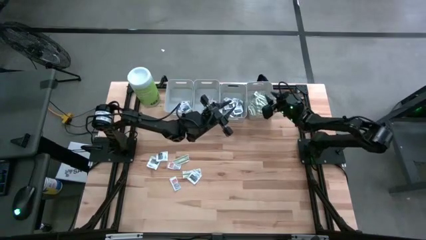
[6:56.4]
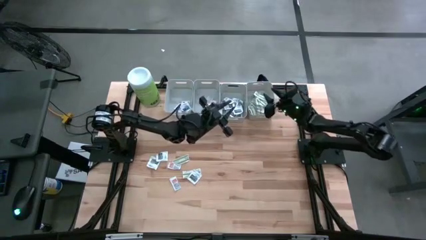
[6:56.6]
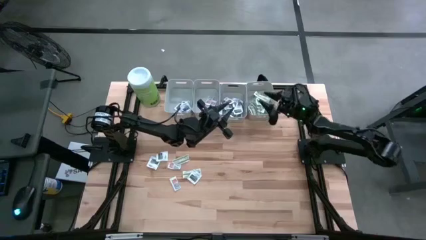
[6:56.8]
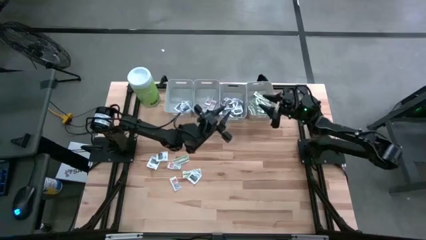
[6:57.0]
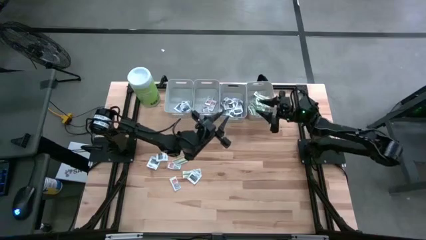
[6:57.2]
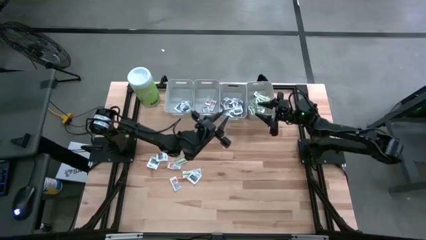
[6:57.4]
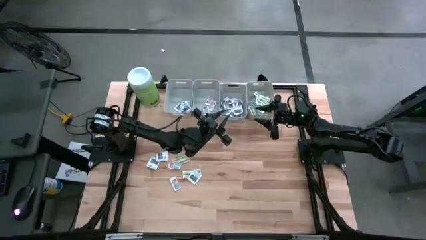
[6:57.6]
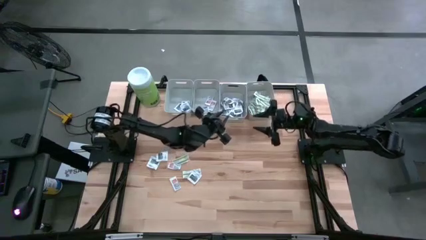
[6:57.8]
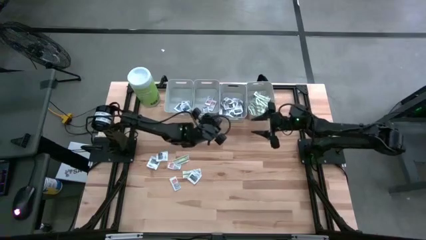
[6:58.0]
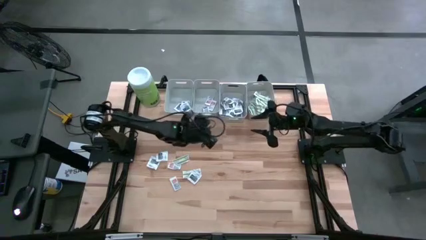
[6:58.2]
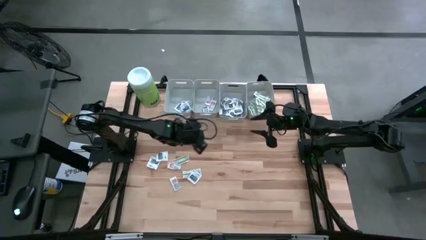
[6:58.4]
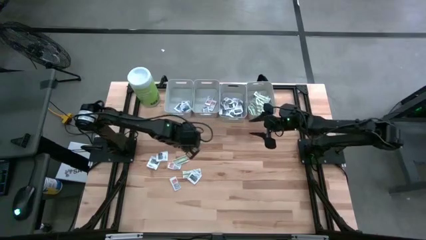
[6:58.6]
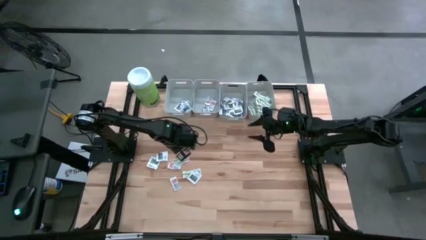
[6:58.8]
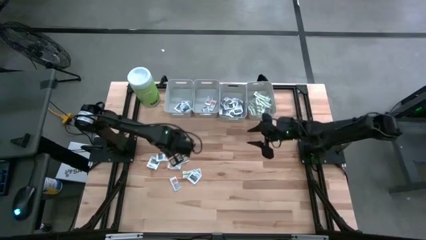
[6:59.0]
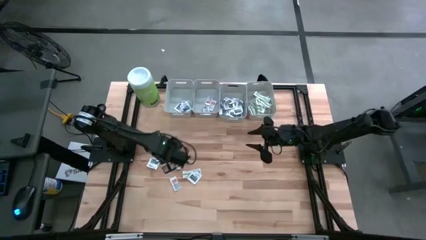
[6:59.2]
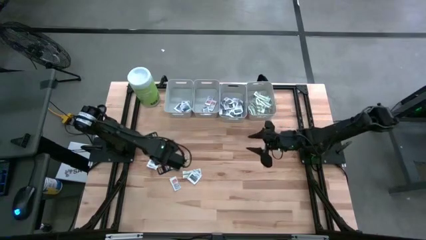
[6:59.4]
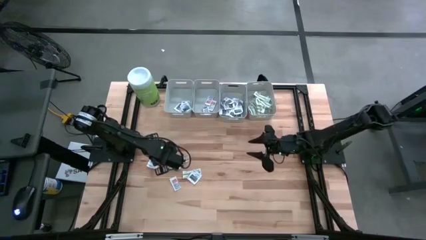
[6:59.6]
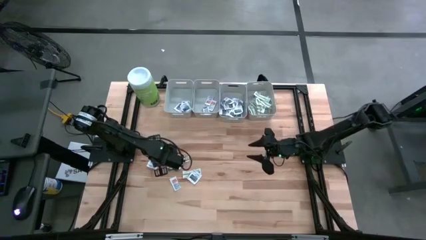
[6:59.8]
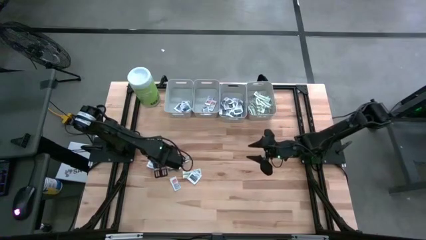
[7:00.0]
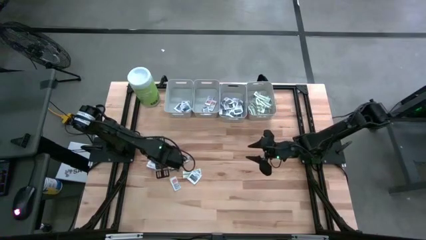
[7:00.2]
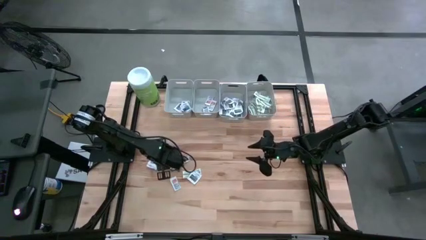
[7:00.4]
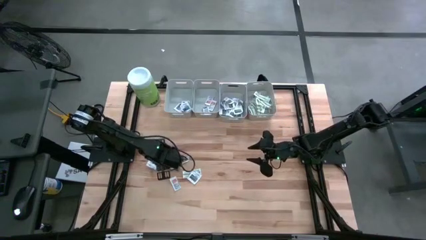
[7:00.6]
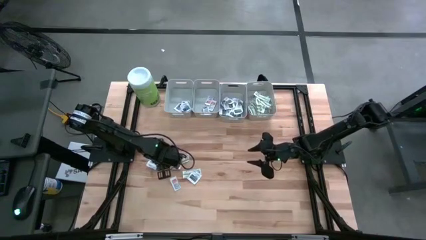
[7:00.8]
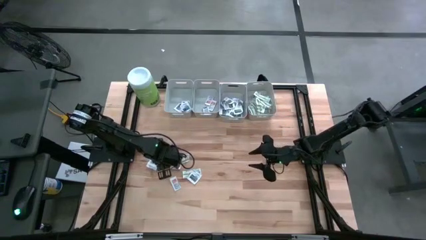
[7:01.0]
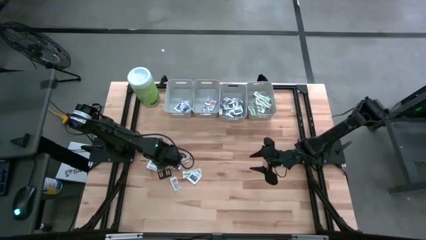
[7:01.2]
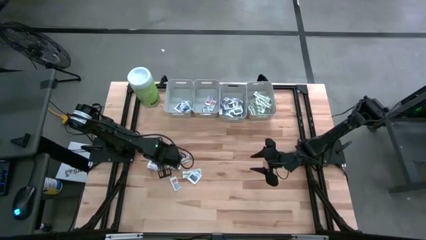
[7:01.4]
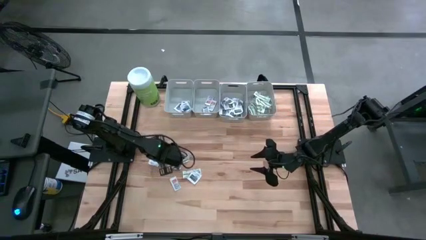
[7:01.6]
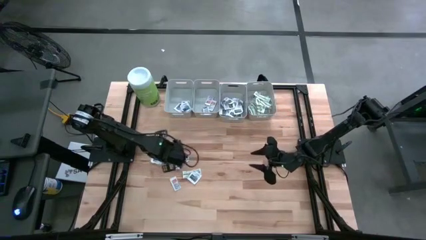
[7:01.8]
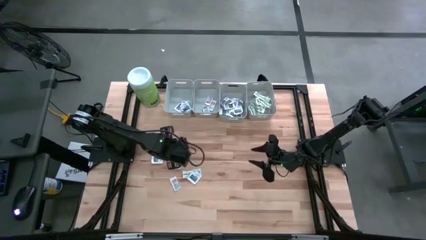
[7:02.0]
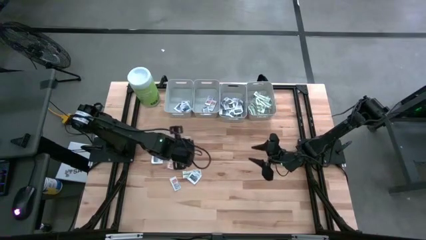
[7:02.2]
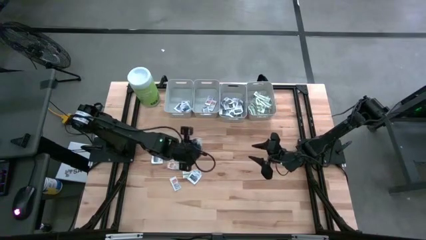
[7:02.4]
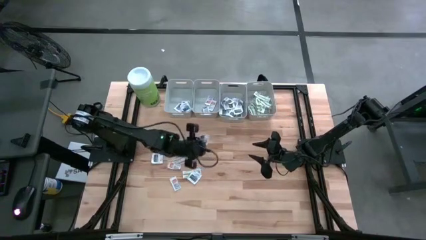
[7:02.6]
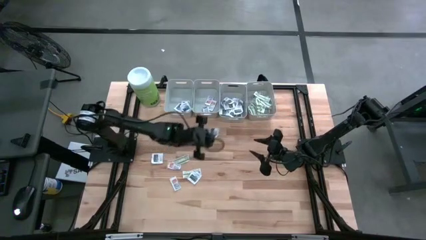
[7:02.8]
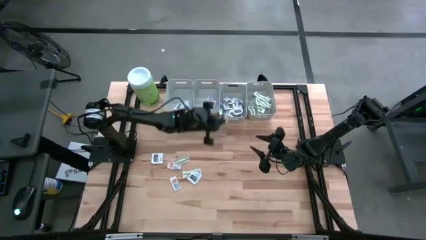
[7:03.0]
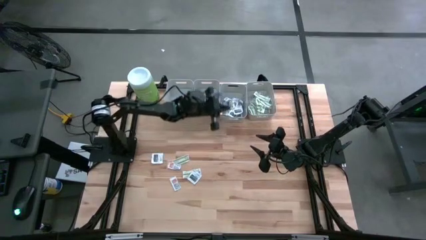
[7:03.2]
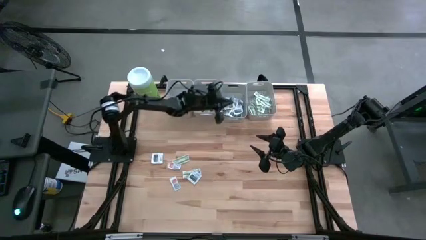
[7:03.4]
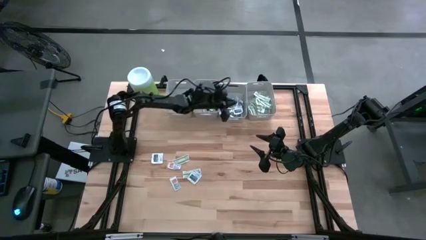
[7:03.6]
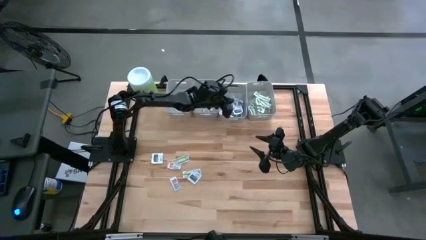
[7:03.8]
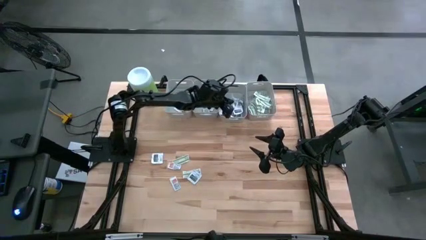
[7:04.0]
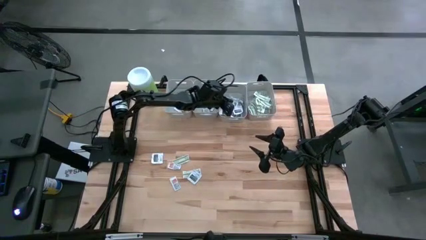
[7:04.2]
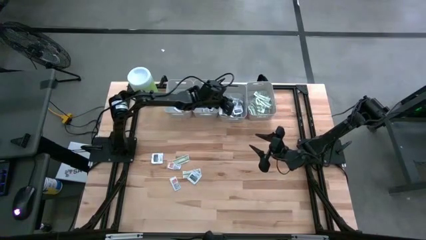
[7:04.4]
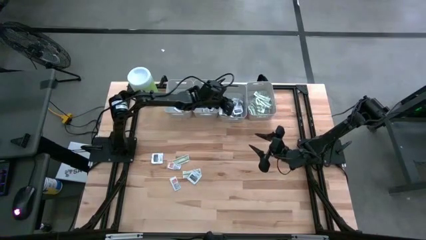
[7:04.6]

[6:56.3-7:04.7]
Task: Pick & Place First Aid Supplies
Put the towelette pack into the middle right gray bin

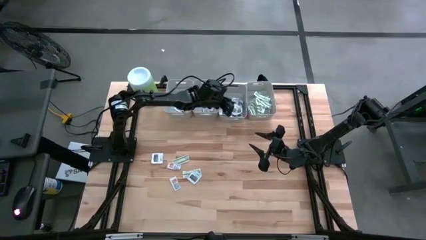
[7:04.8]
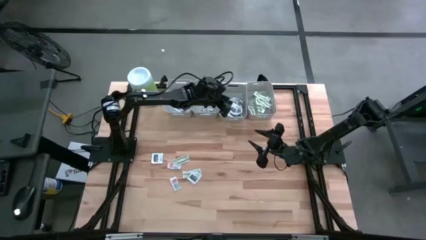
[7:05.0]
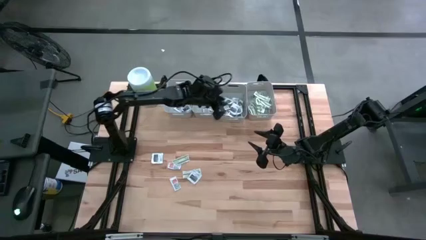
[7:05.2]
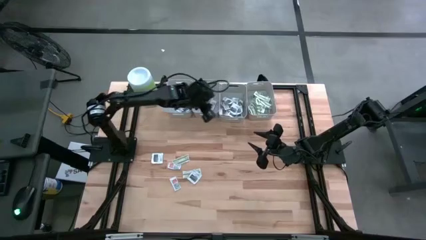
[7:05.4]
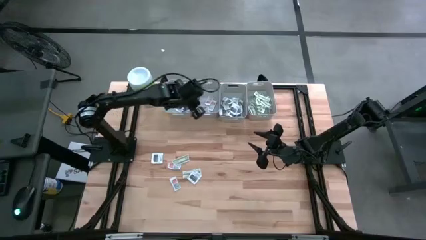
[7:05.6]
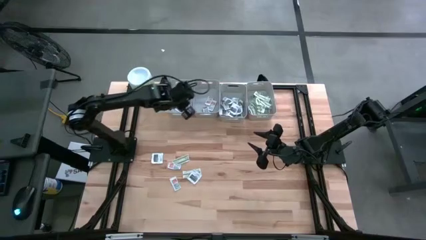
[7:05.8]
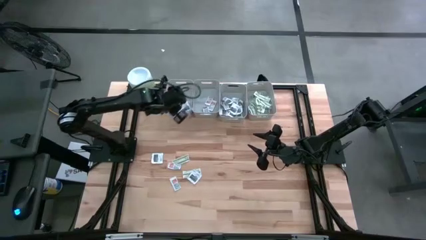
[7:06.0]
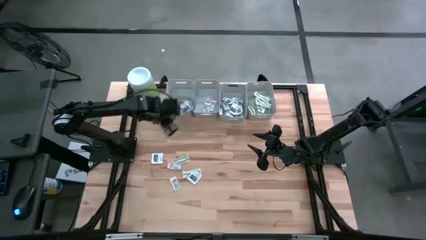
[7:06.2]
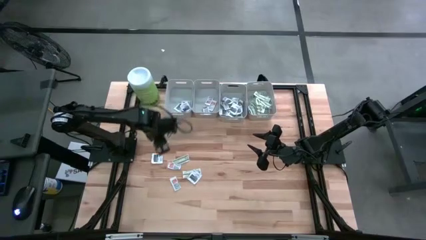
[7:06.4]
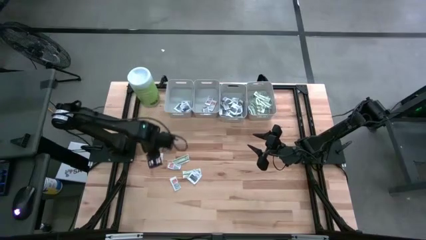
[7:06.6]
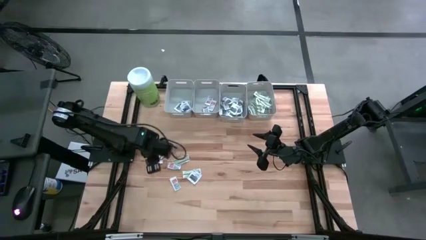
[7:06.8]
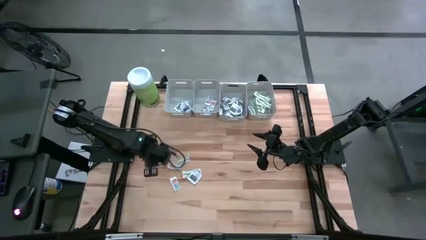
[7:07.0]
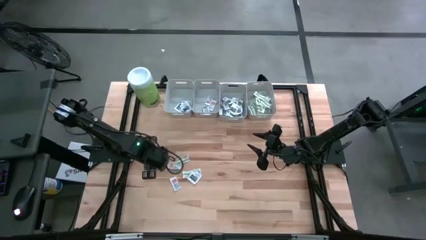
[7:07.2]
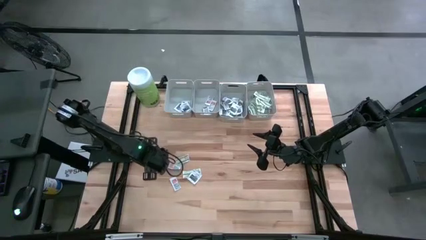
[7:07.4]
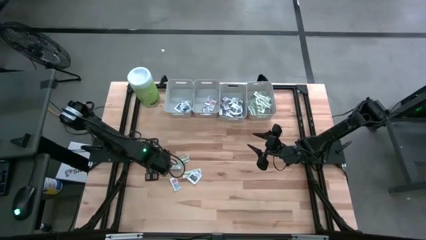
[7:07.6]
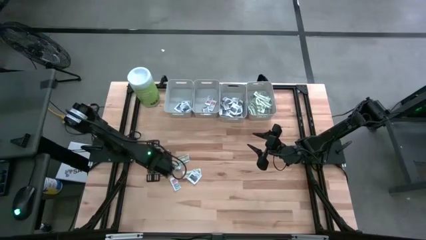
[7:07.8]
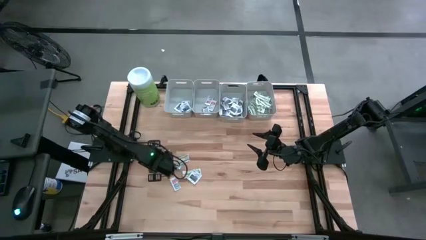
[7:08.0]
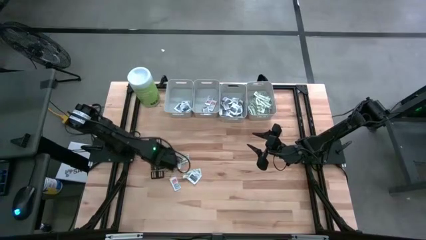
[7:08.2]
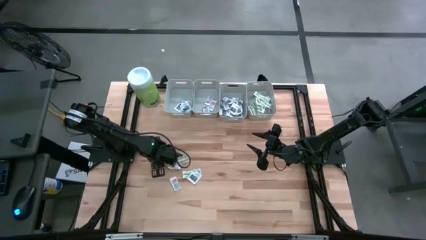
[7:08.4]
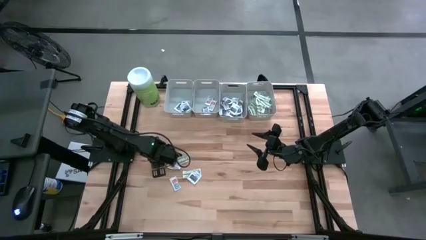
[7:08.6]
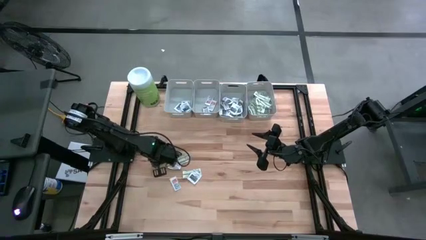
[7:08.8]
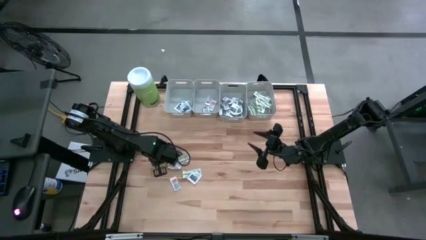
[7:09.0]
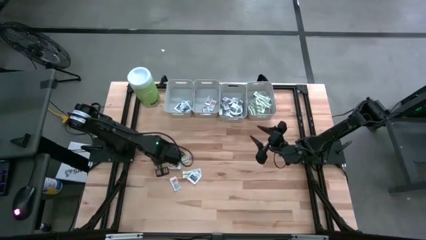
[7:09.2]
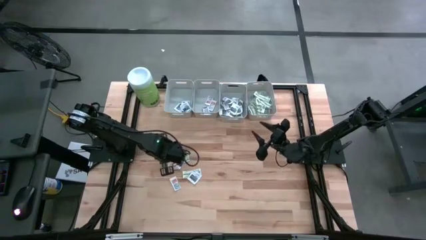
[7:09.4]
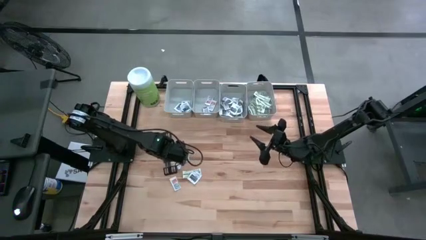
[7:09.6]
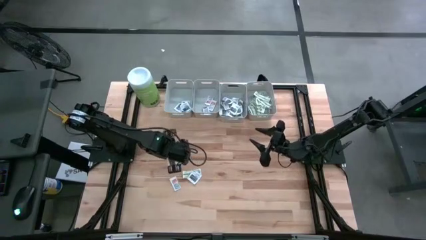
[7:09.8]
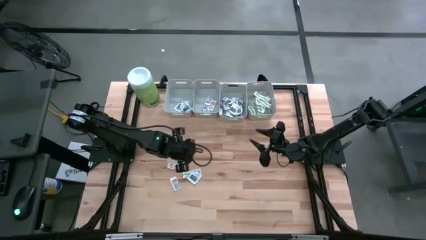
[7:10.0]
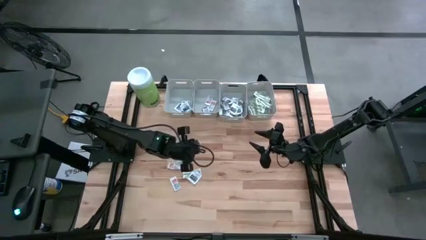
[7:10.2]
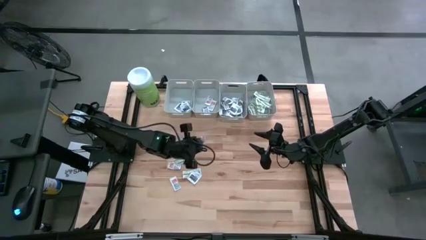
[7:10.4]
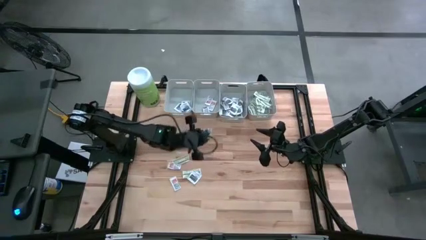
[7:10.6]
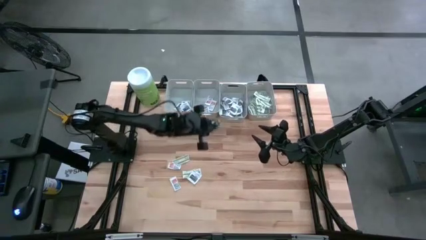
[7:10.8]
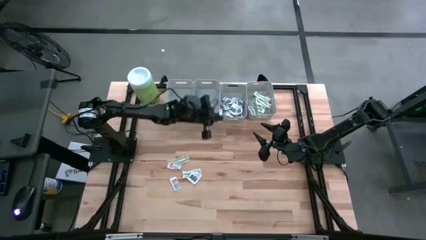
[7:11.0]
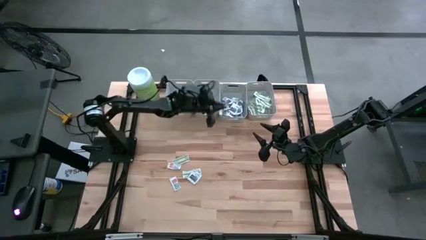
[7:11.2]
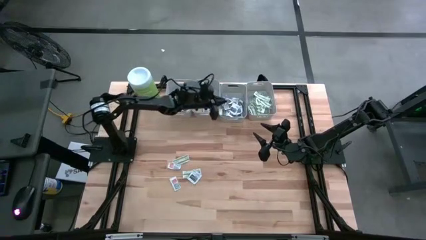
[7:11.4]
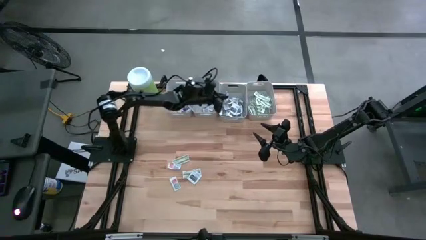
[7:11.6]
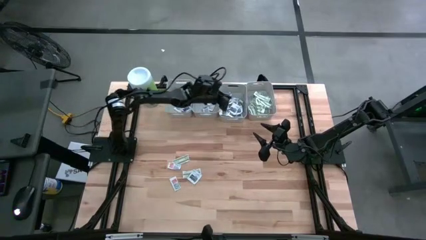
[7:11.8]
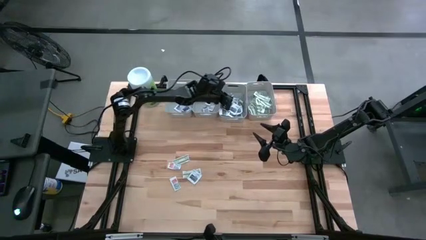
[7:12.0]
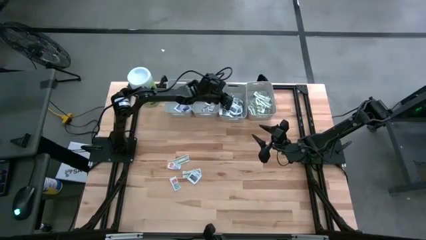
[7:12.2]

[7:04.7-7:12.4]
Put the towelette pack into the middle right gray bin
